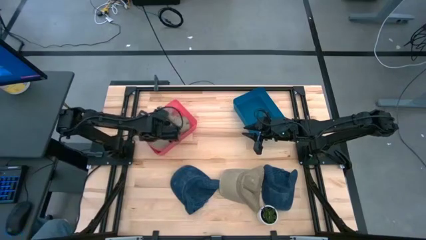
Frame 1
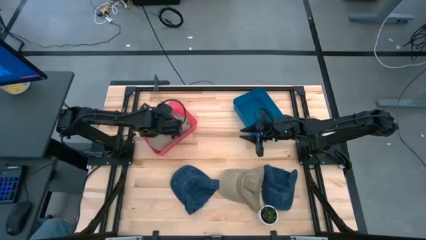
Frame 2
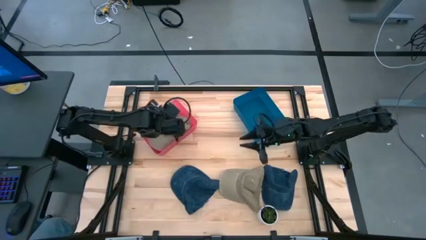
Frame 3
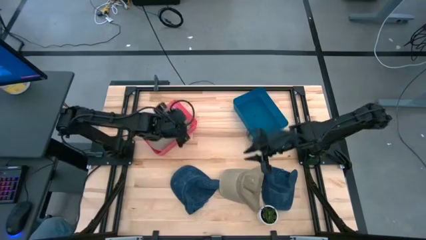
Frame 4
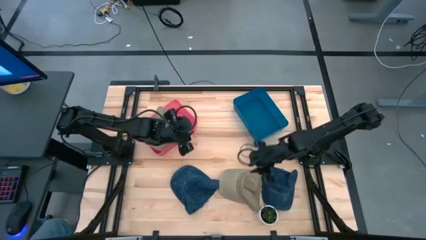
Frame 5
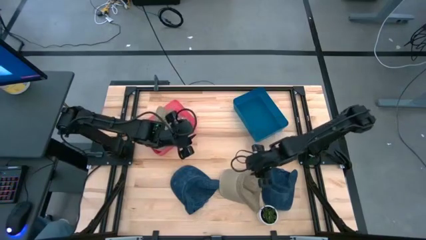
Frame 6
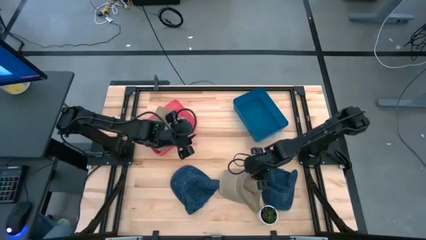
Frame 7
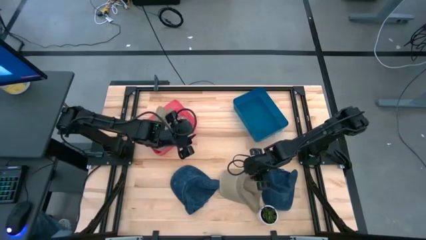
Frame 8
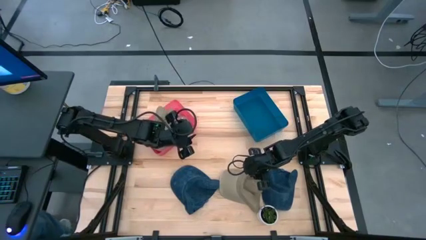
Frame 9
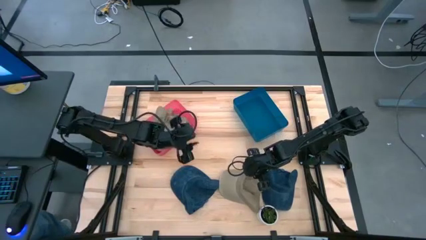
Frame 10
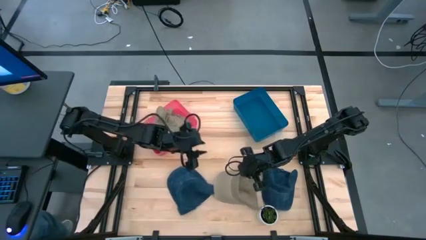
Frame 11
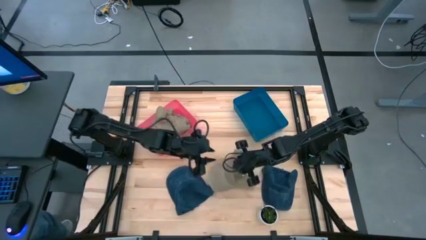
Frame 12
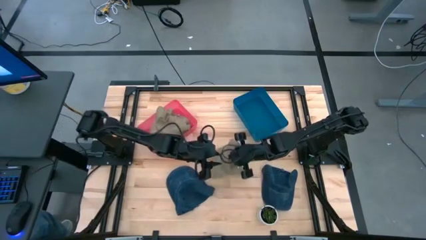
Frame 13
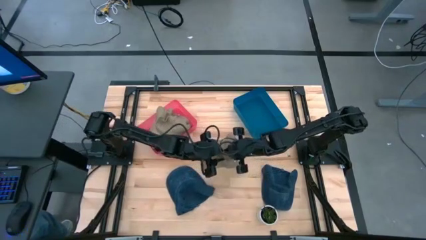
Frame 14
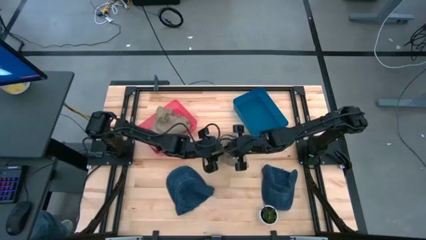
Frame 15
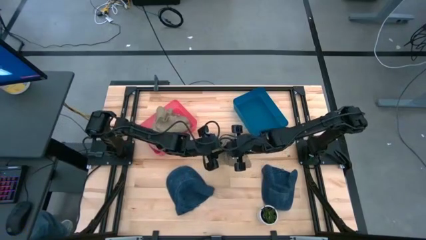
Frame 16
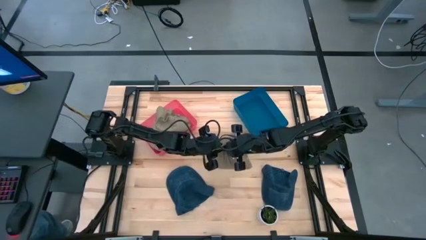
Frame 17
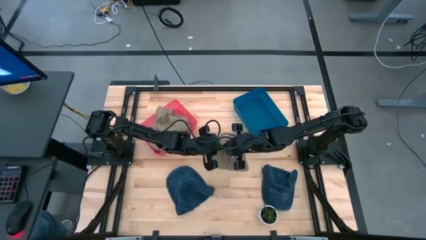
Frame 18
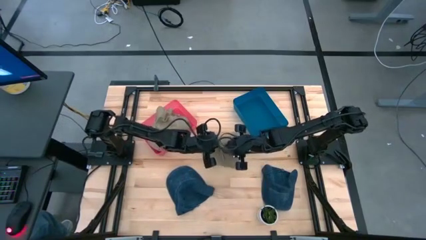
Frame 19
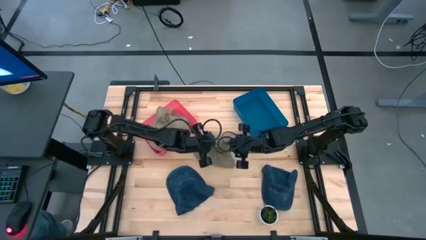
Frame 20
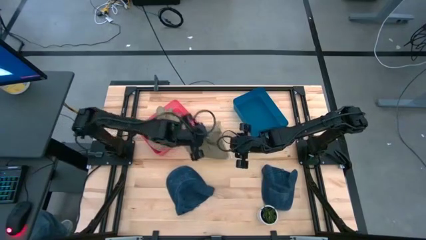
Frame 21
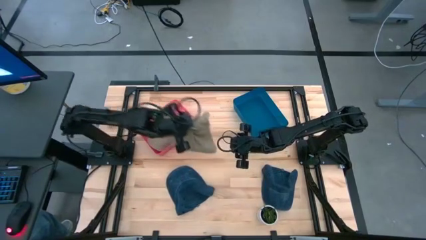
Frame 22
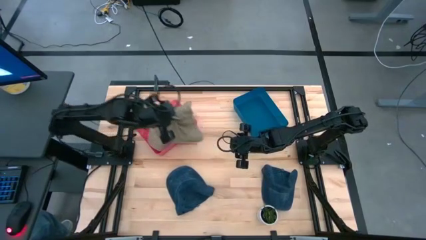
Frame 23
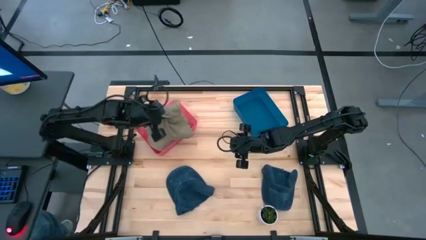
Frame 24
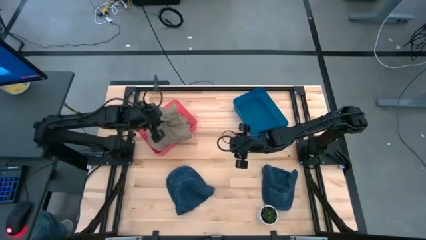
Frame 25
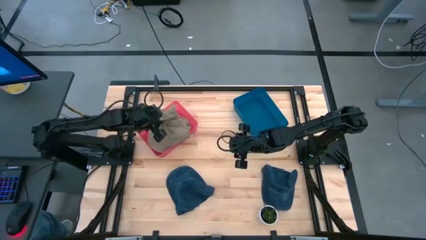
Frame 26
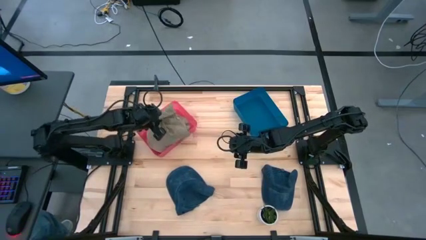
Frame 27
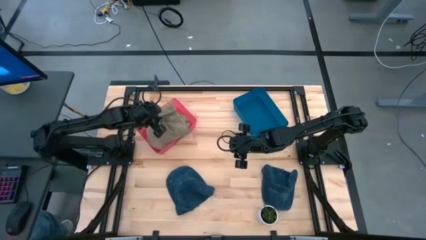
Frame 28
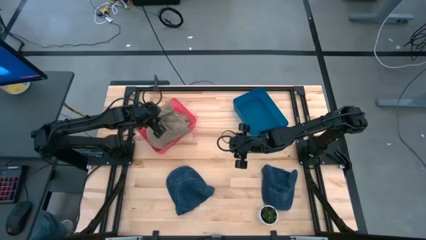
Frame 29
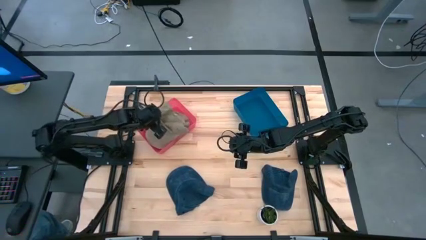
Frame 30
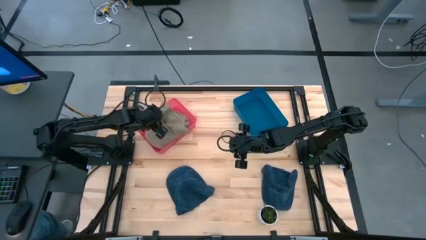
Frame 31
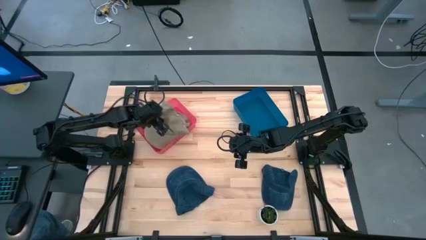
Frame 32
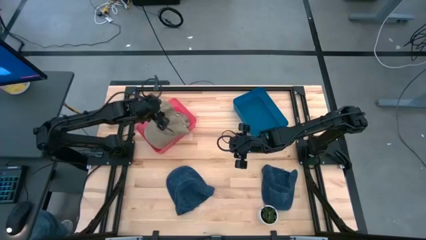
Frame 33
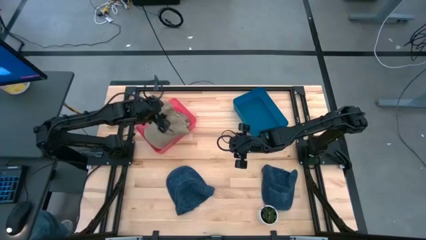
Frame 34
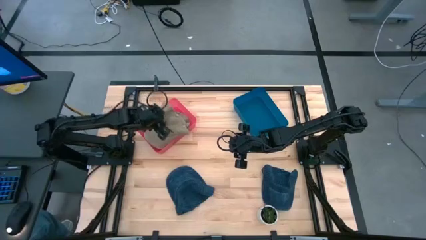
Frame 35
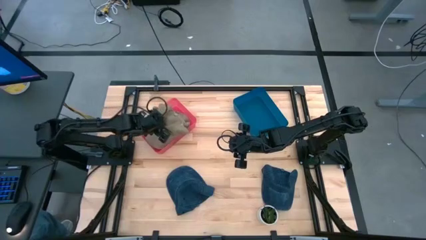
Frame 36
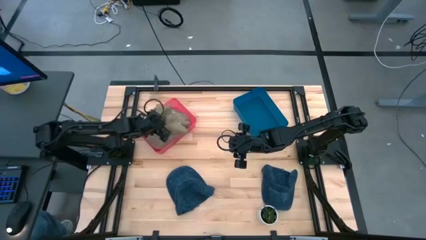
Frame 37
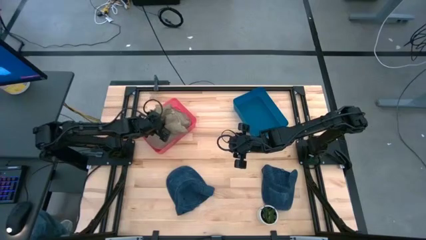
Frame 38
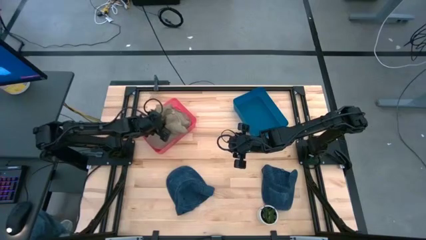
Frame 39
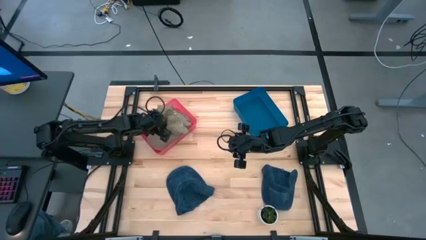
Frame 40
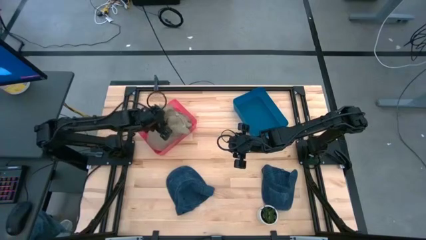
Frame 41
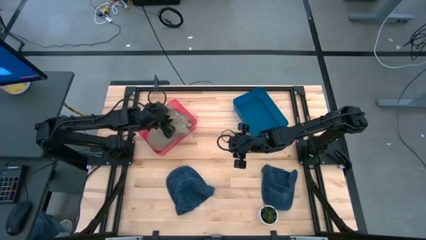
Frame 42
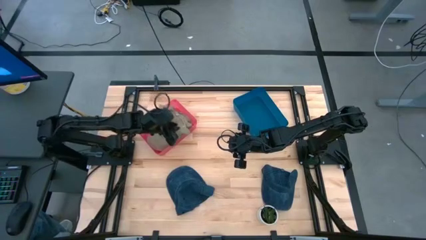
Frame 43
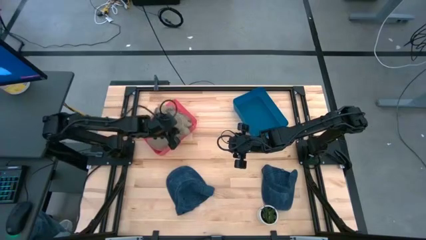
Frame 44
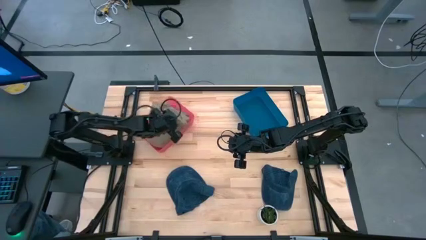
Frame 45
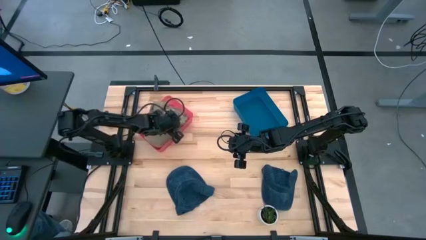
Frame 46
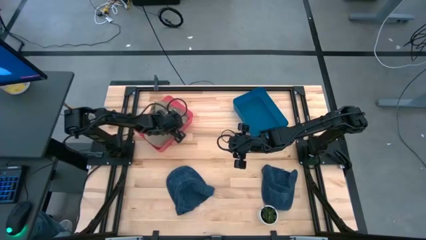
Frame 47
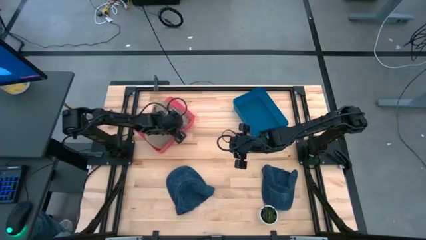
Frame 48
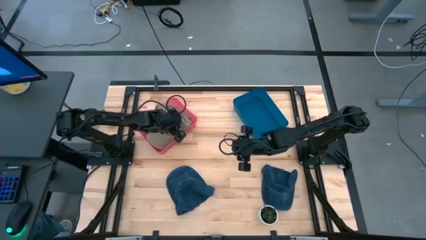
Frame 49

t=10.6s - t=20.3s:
Task: Pick & Place hat
Put the brown cap into the red bin

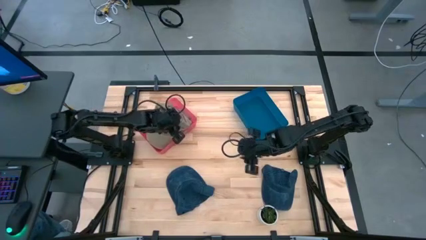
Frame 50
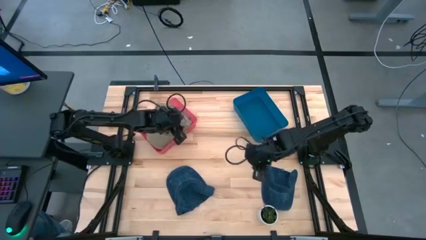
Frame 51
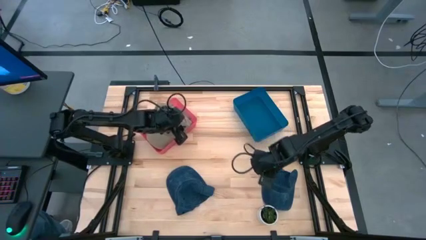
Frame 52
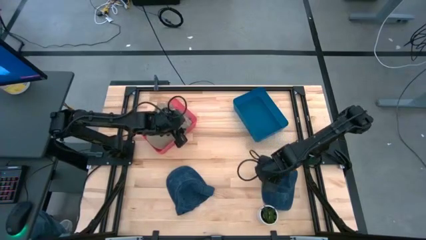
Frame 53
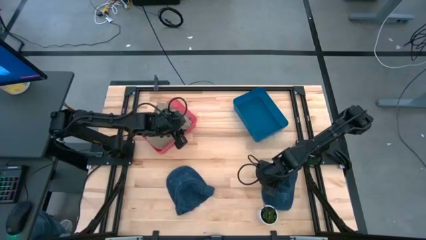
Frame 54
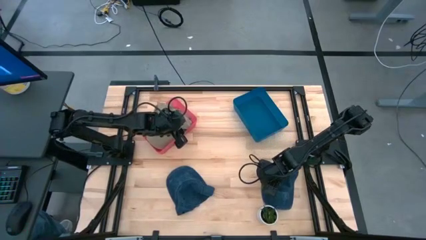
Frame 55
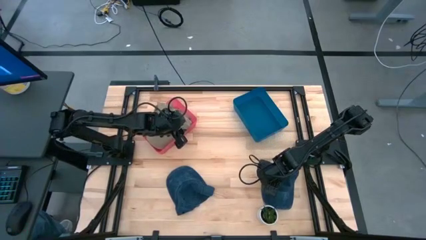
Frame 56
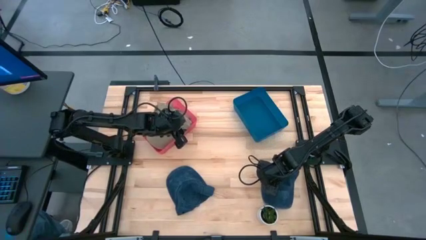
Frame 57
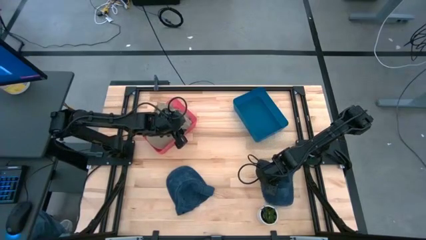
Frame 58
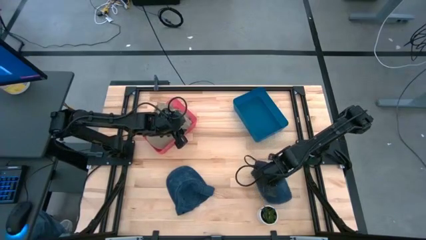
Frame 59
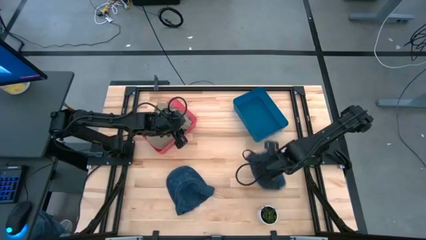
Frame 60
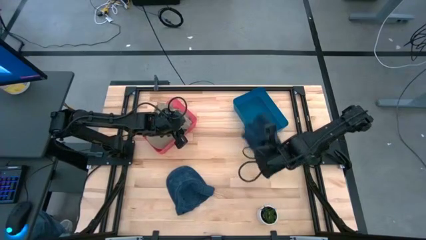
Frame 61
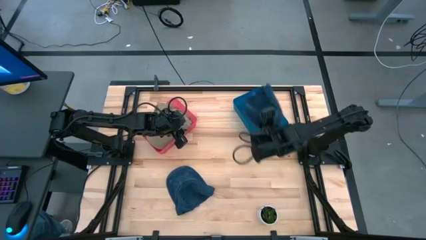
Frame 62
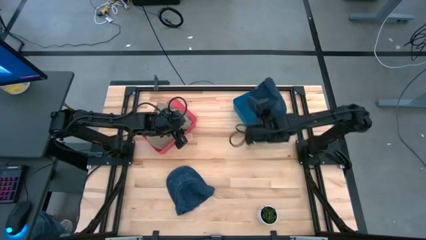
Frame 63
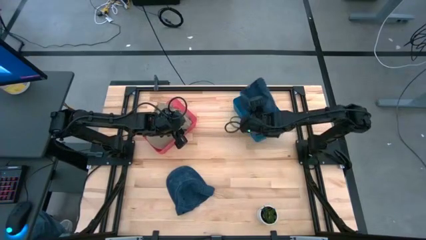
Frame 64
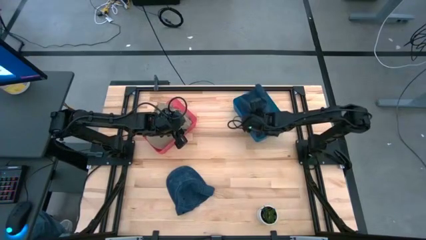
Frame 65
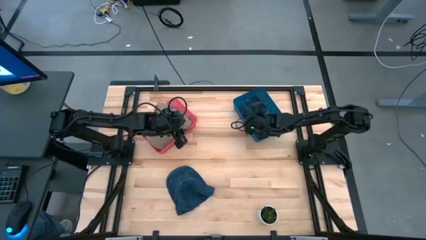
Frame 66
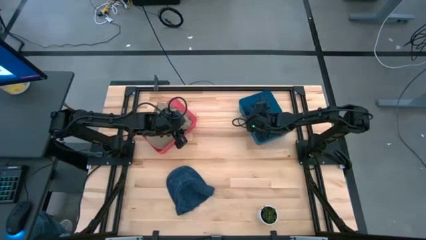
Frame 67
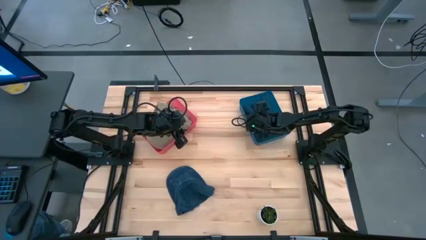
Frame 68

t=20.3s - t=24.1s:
Put the right blue cap into the blue bin

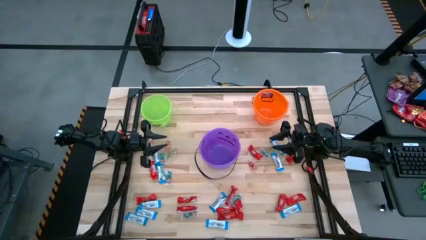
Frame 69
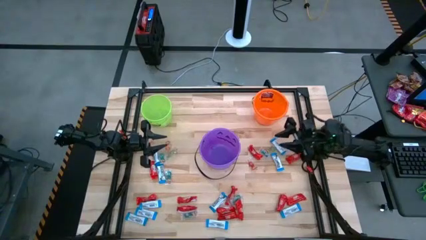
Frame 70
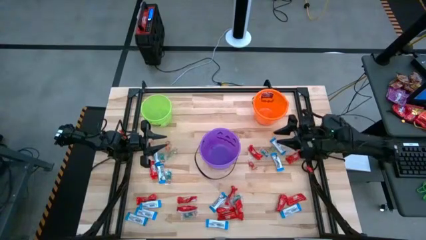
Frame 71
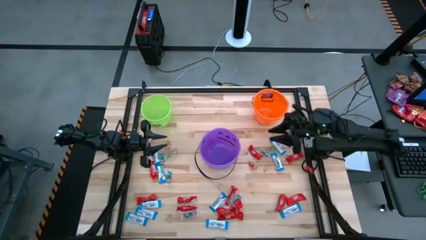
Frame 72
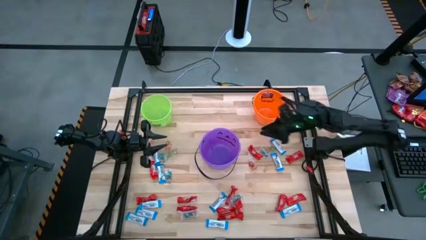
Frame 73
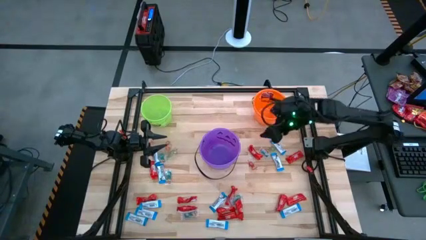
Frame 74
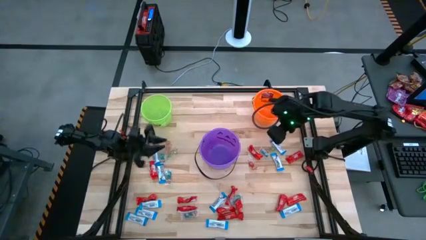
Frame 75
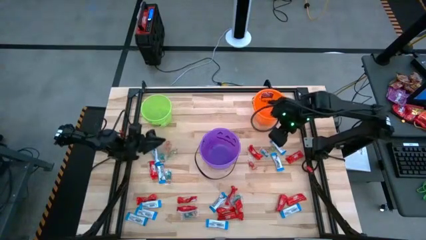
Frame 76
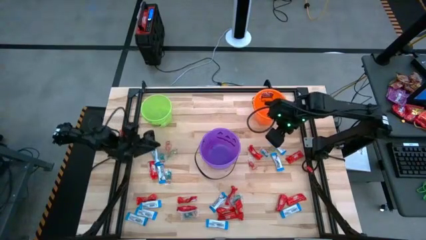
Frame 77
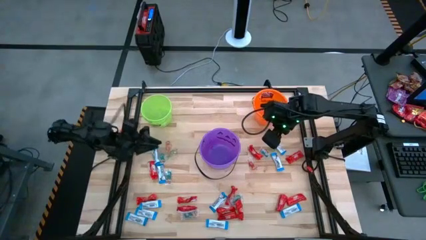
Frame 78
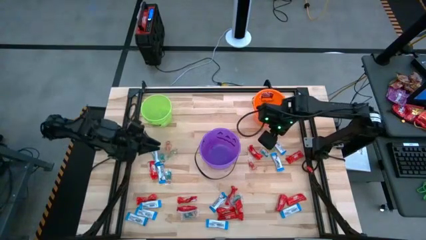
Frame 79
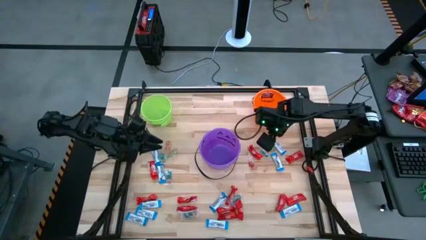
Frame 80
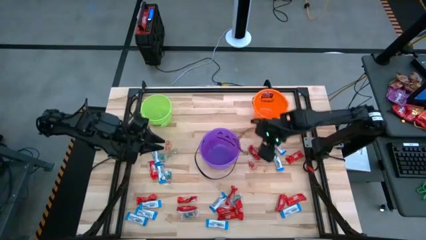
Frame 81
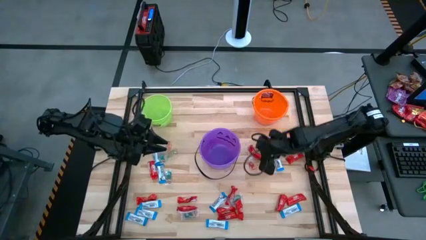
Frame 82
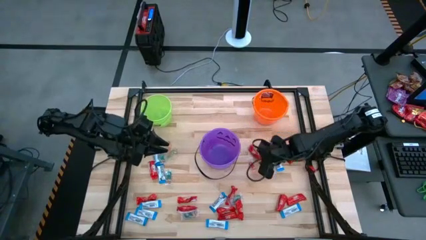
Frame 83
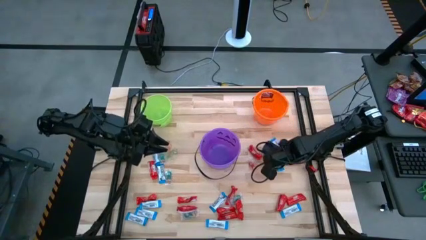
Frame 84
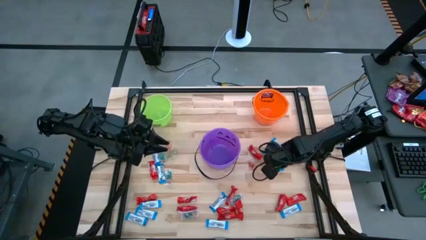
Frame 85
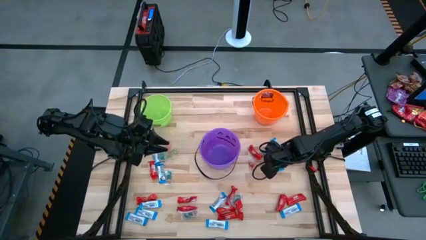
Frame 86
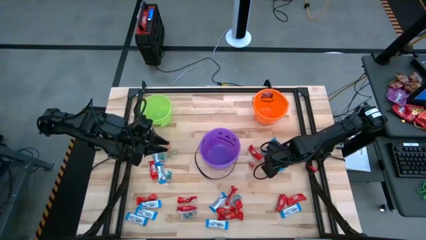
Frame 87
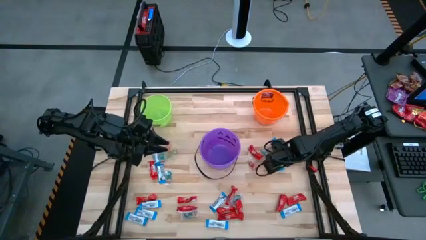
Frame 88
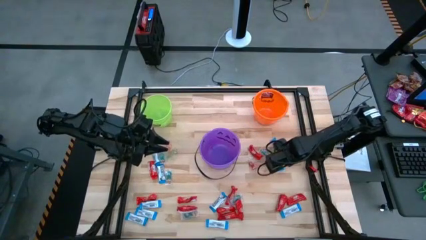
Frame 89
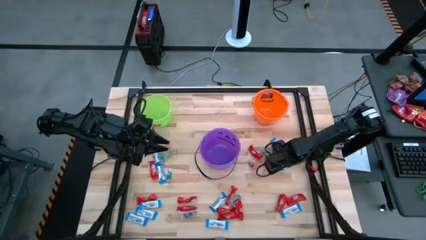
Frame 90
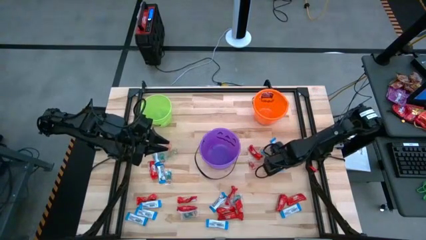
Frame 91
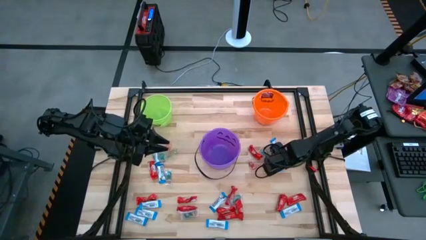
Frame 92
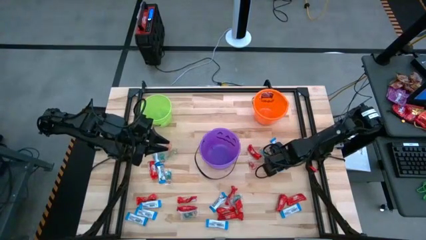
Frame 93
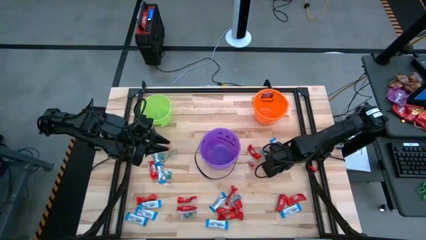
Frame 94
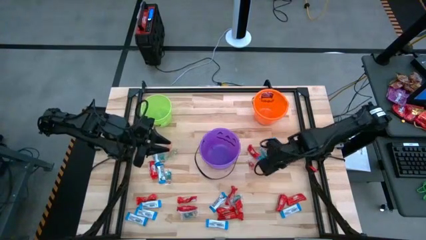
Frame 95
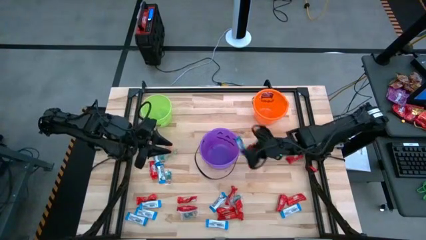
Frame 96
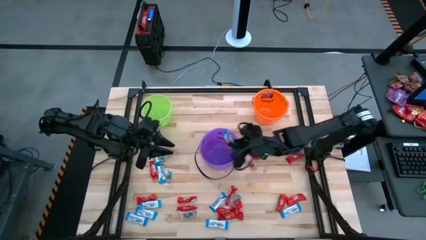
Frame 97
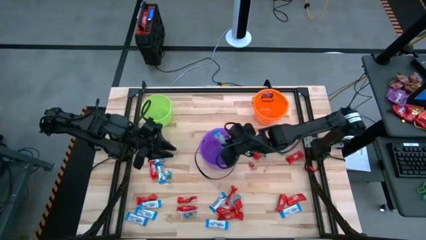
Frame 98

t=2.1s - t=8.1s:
Task: Sort candy by brand, put in halloween buckets
Put the white chocolate into the purple bucket
